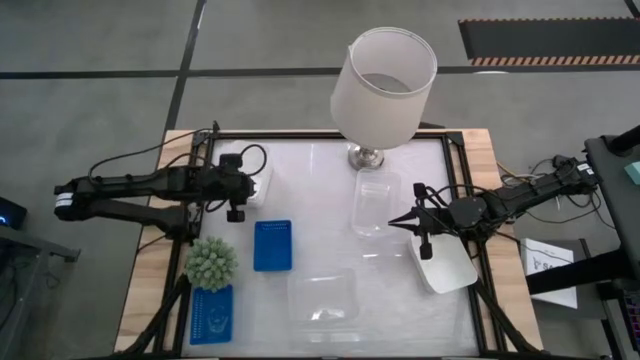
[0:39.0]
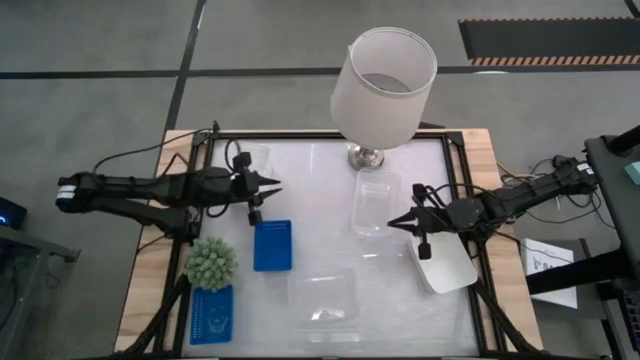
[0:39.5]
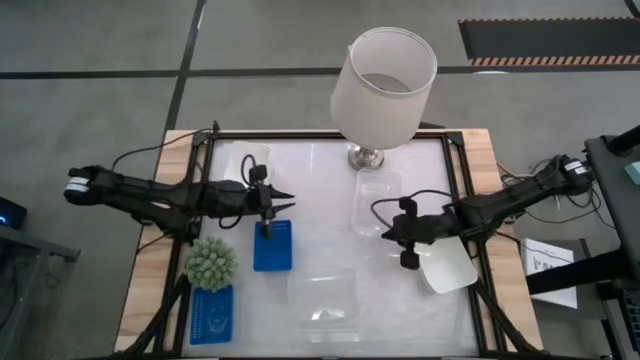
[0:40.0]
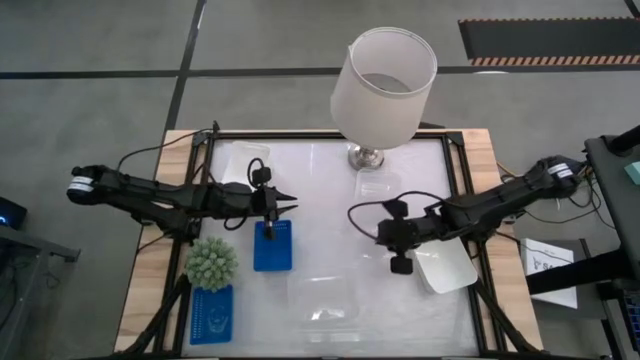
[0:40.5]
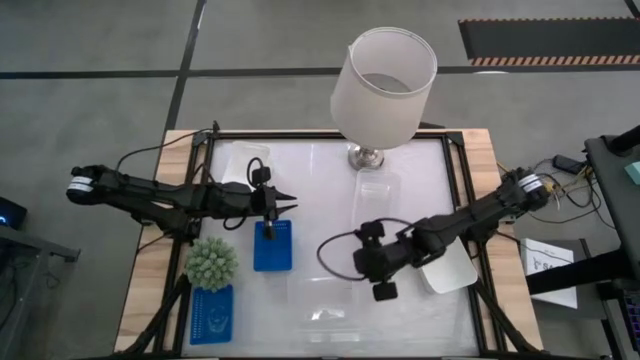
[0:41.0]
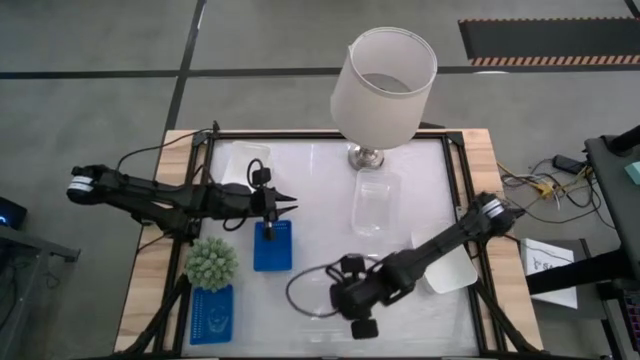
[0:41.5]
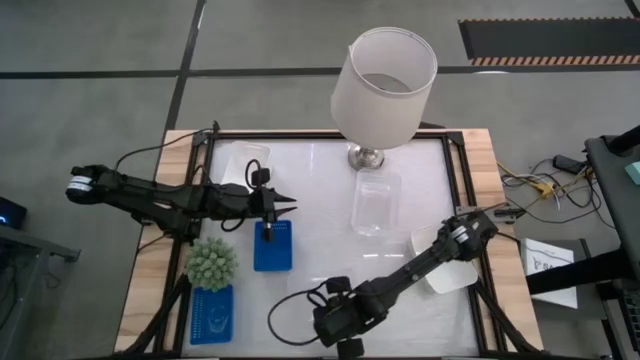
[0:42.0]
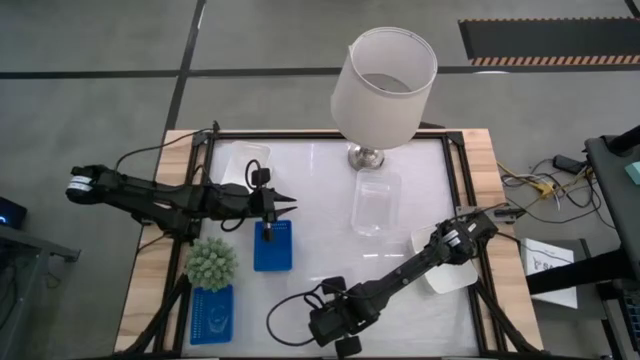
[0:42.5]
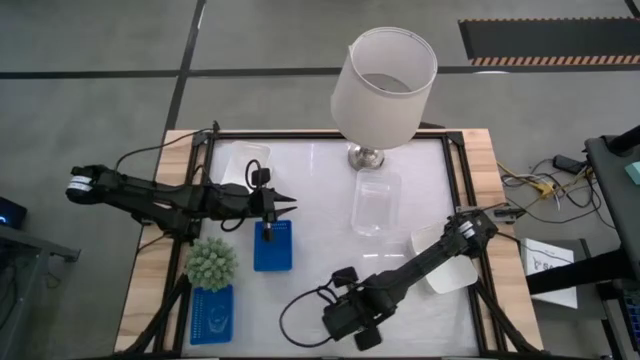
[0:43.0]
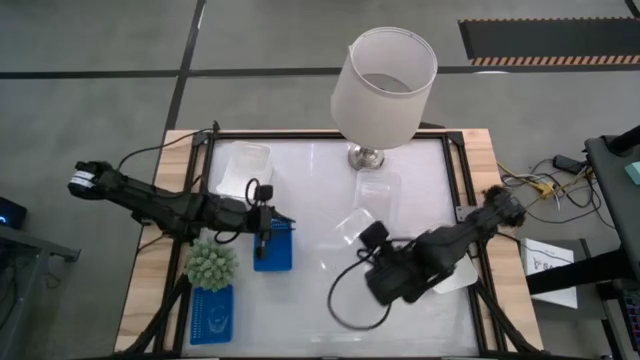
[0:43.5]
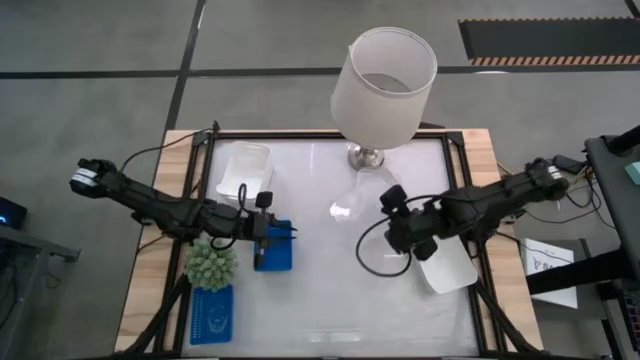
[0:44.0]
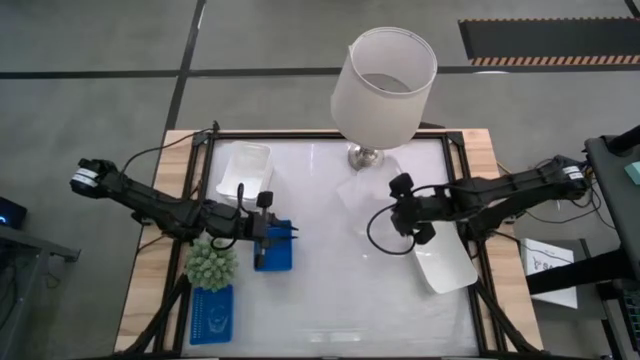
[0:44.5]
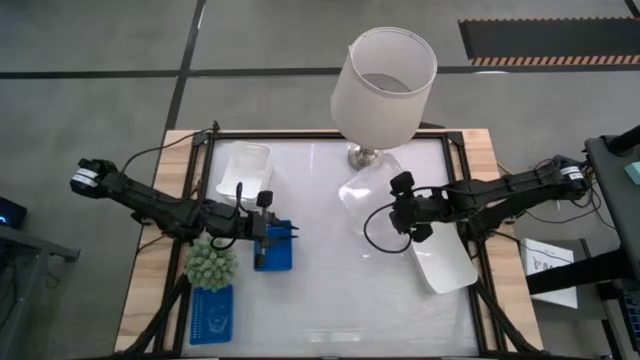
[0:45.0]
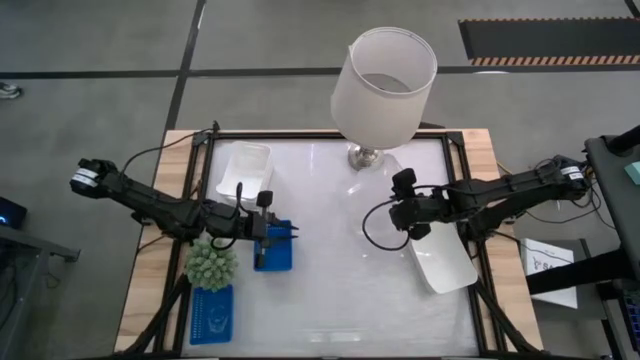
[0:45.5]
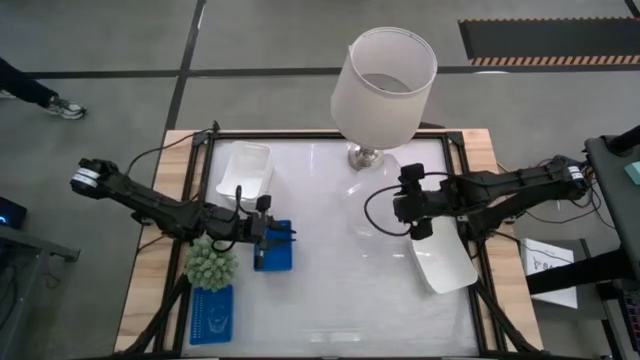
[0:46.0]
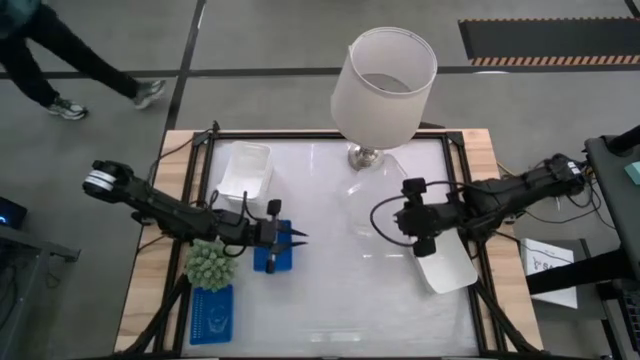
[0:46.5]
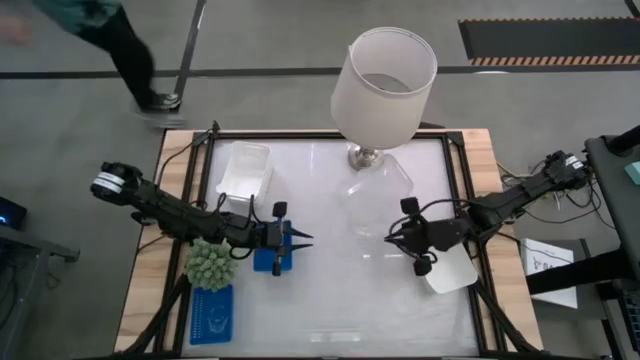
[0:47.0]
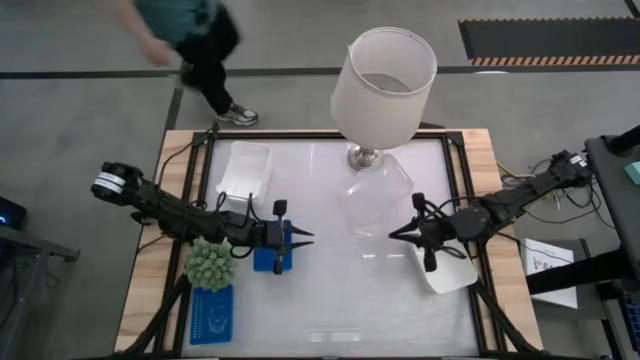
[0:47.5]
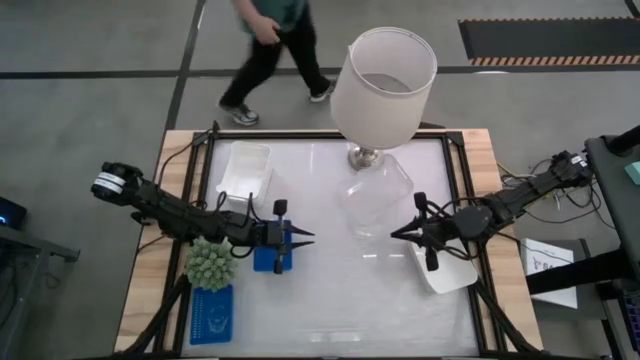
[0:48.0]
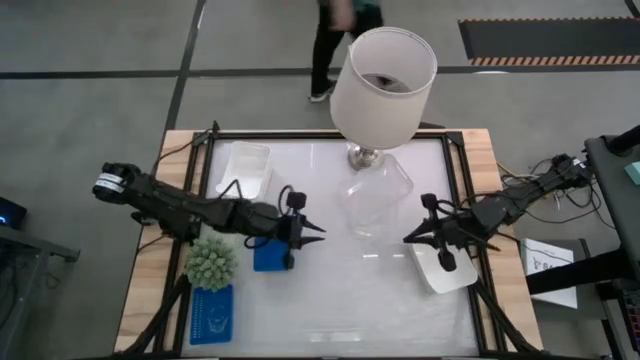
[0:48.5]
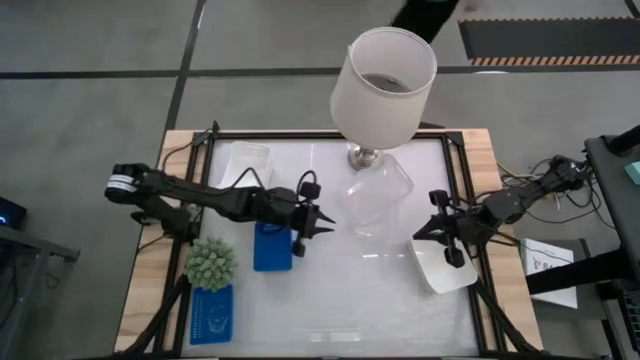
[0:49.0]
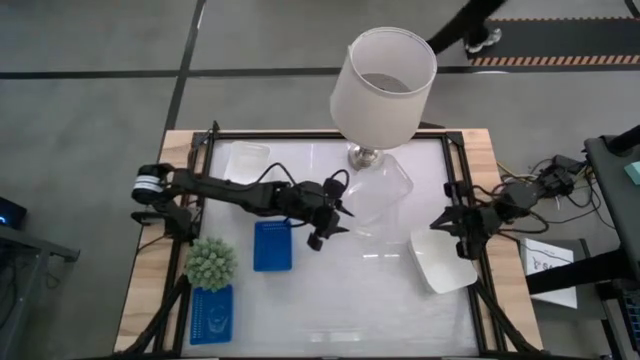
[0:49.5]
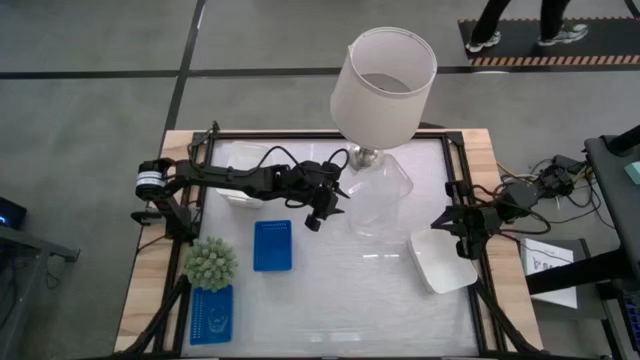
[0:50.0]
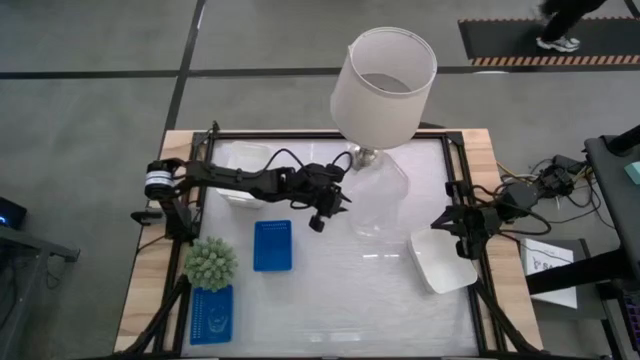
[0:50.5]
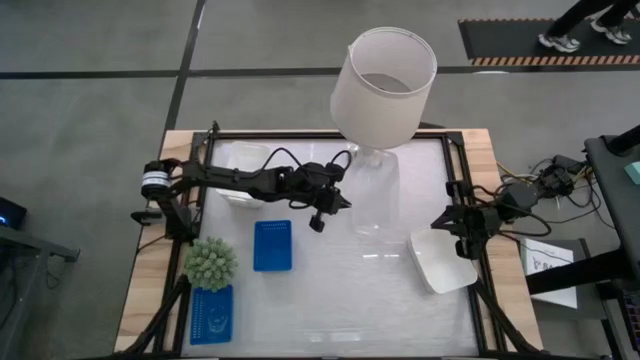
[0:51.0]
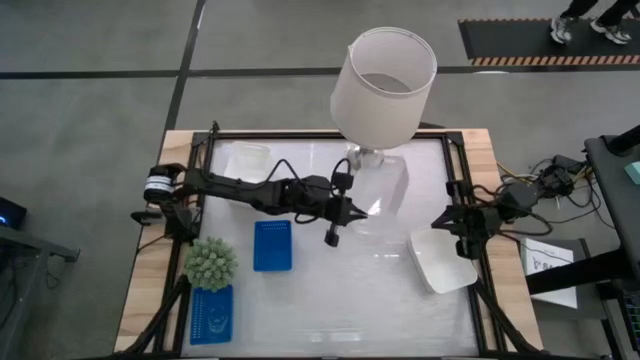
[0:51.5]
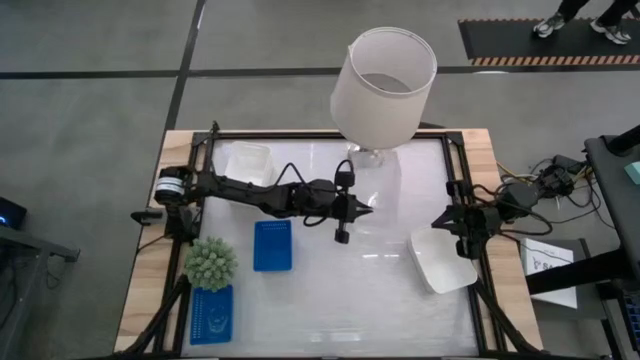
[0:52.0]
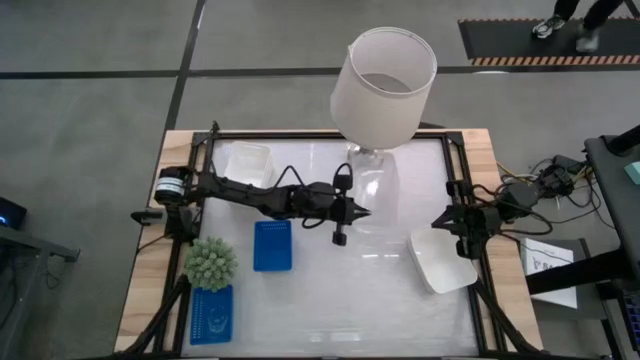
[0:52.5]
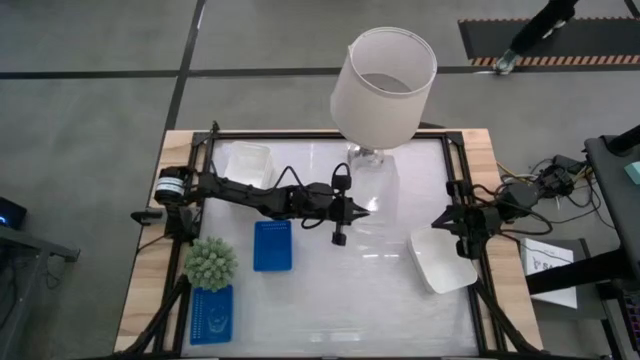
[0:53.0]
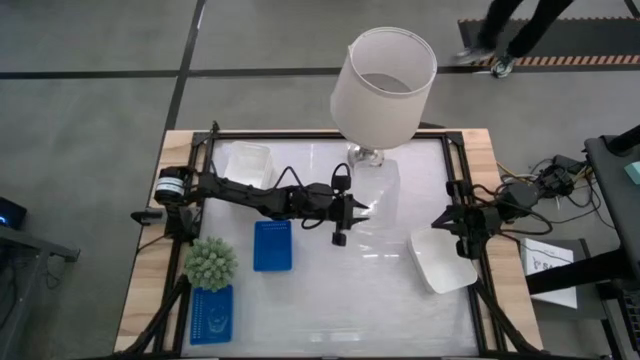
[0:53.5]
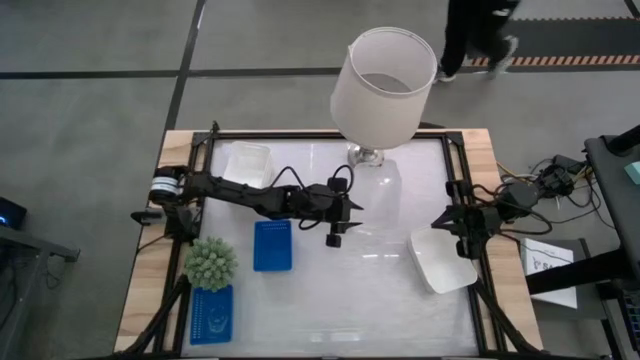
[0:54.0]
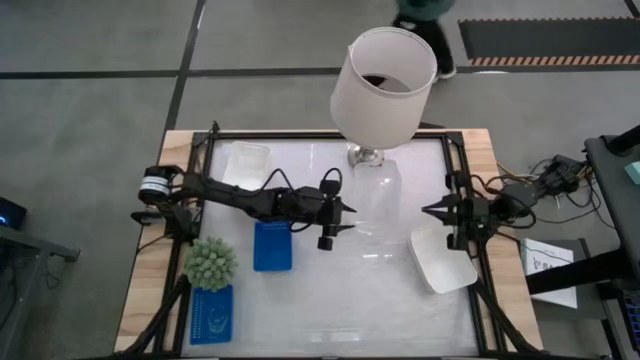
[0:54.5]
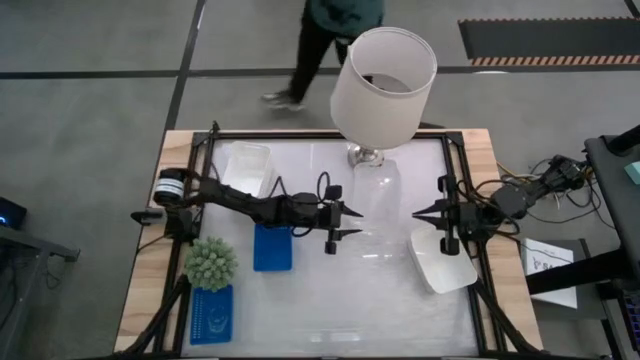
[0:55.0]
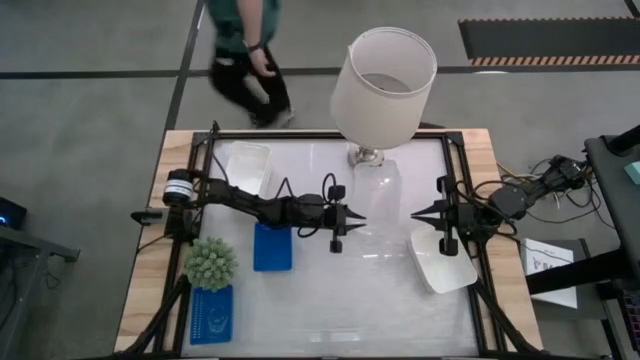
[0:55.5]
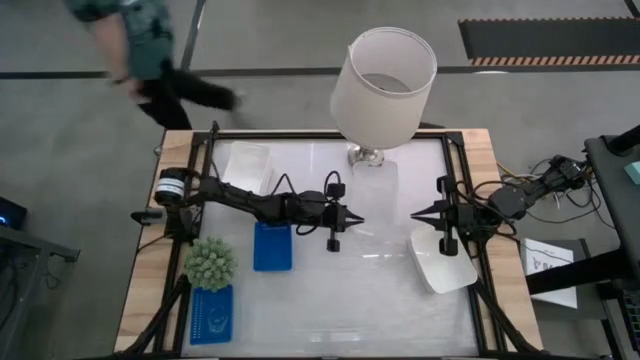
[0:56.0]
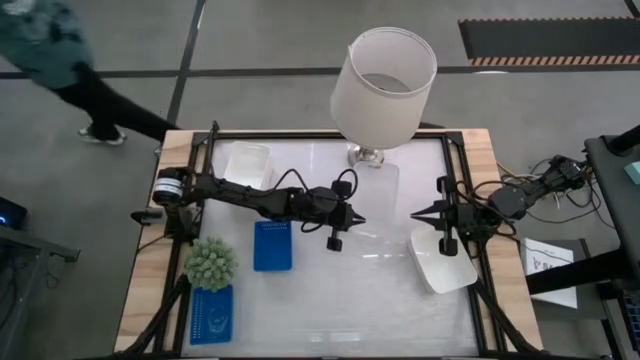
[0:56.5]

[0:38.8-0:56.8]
Stack the bottom transparent bin on the stacked transparent bins
